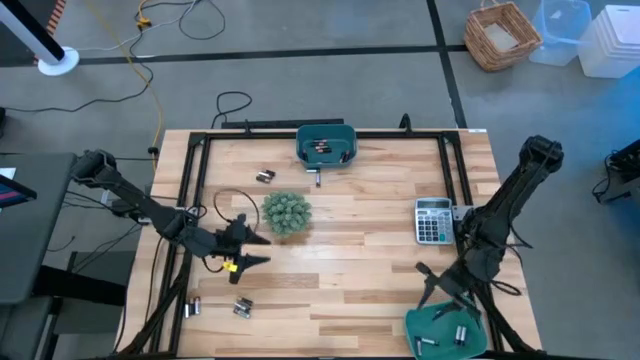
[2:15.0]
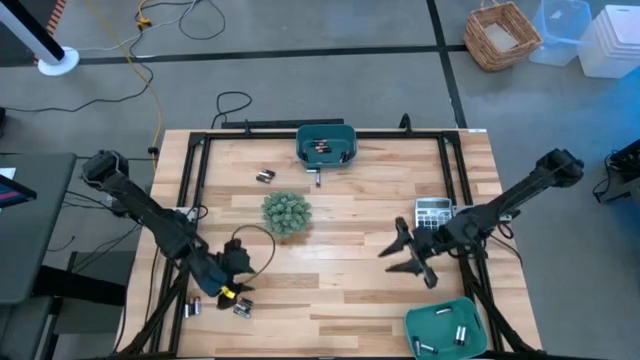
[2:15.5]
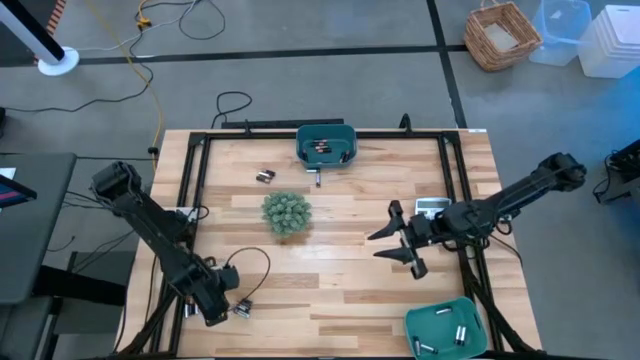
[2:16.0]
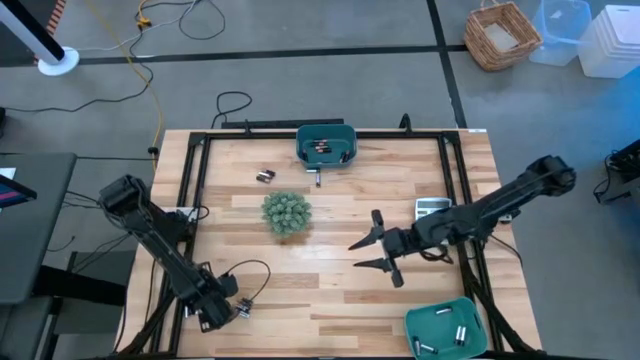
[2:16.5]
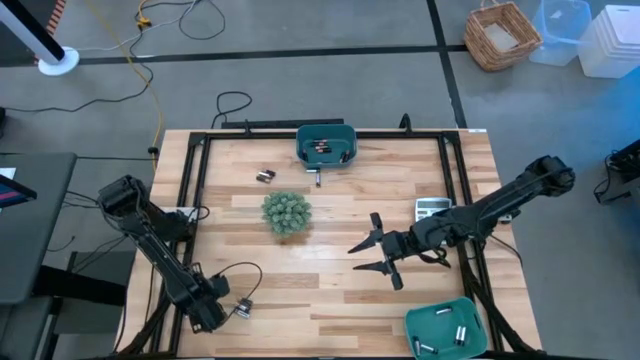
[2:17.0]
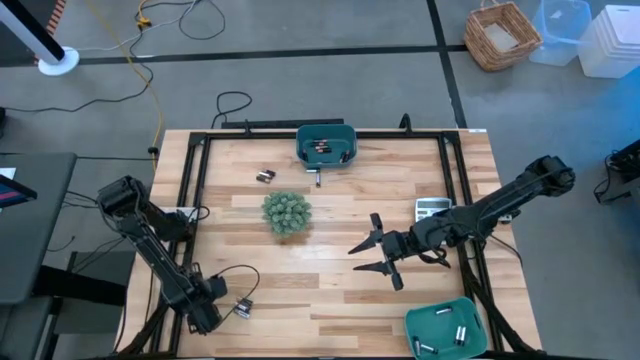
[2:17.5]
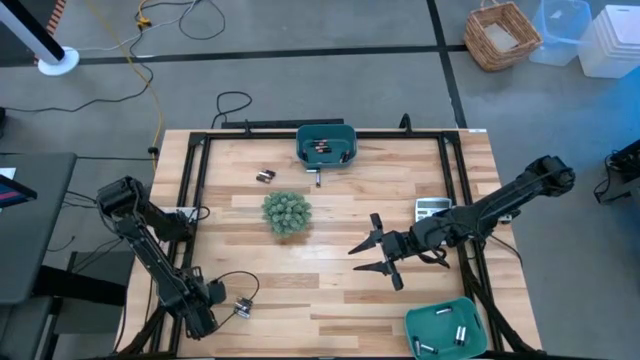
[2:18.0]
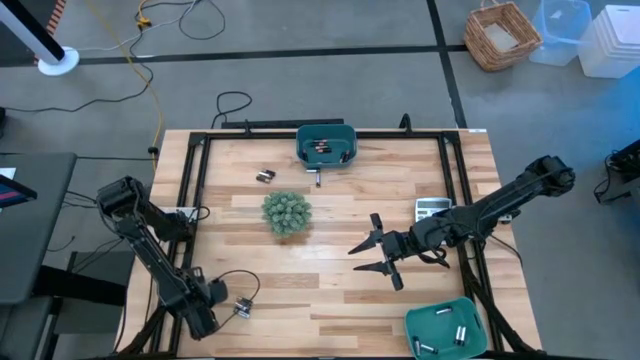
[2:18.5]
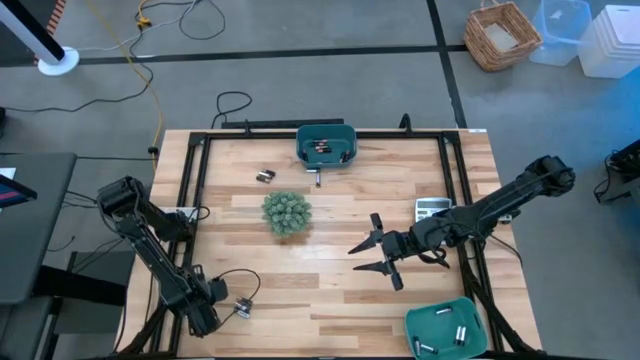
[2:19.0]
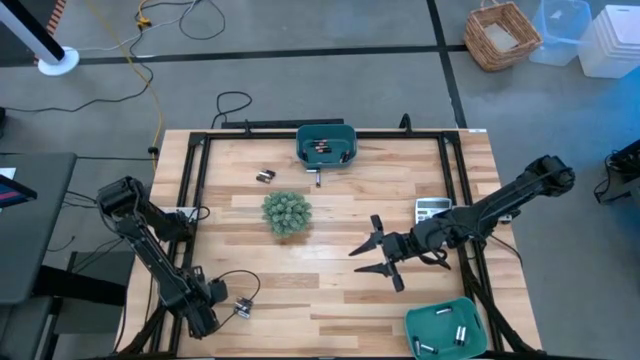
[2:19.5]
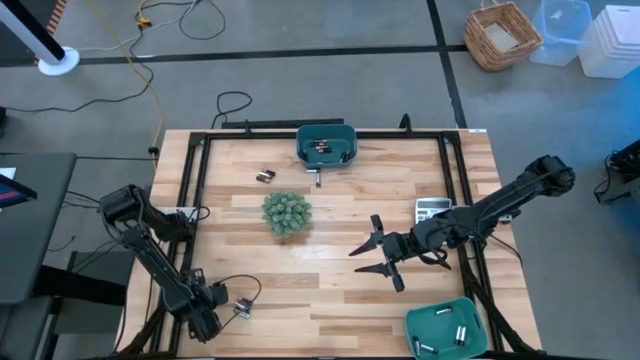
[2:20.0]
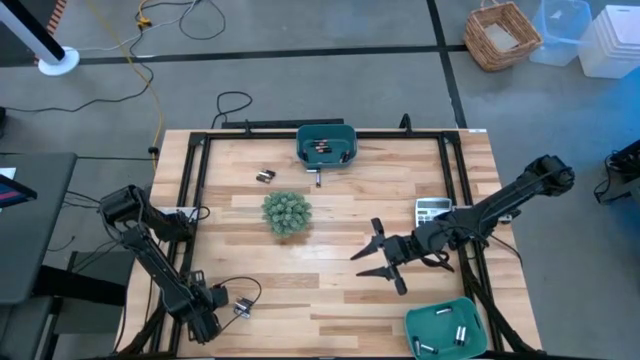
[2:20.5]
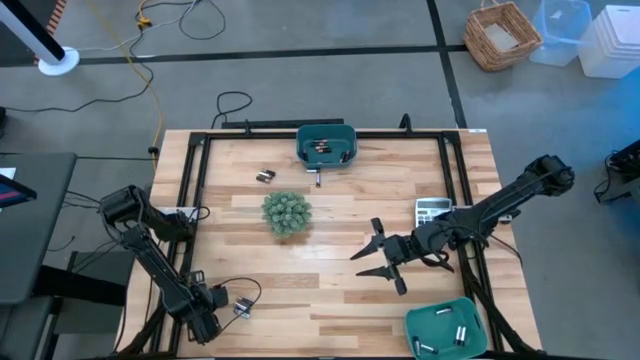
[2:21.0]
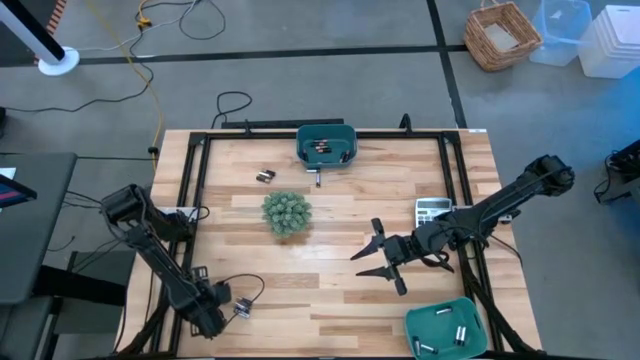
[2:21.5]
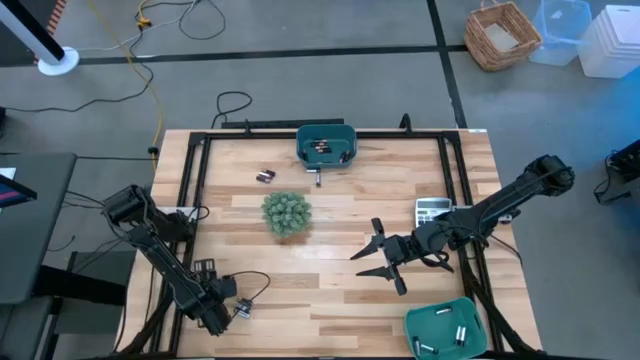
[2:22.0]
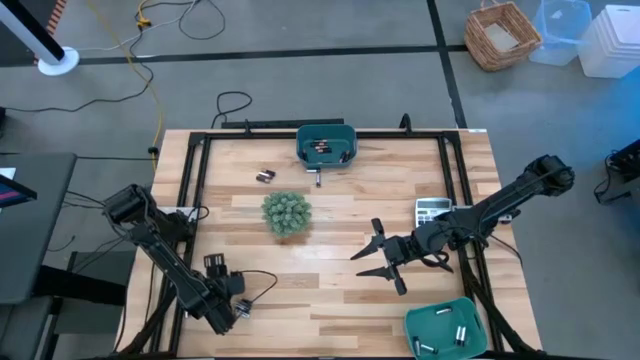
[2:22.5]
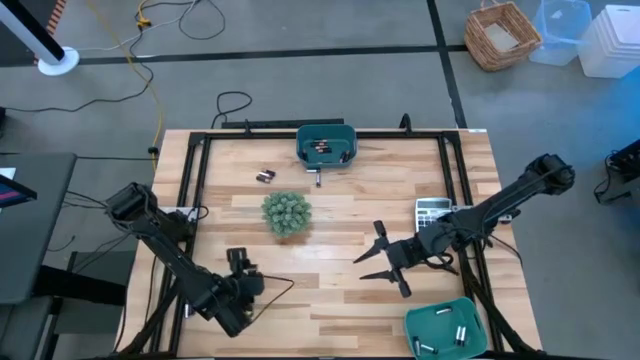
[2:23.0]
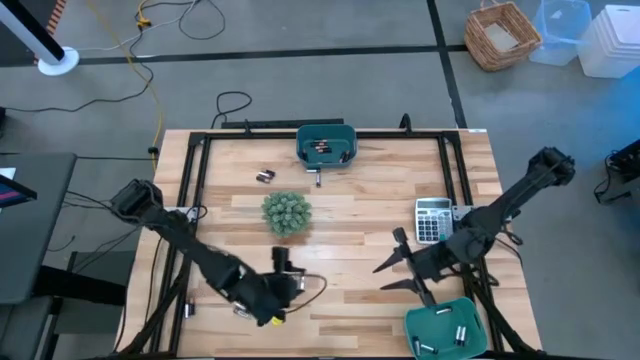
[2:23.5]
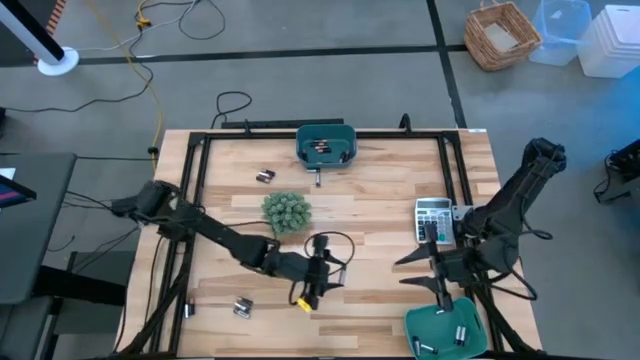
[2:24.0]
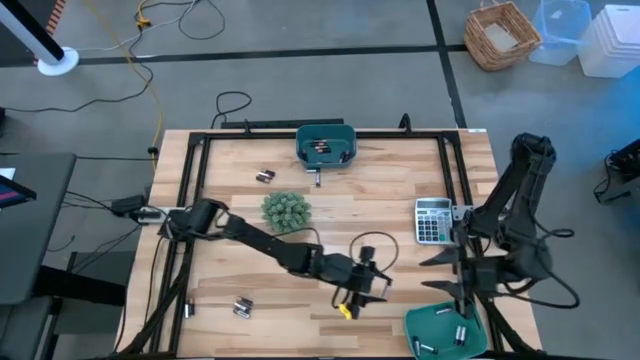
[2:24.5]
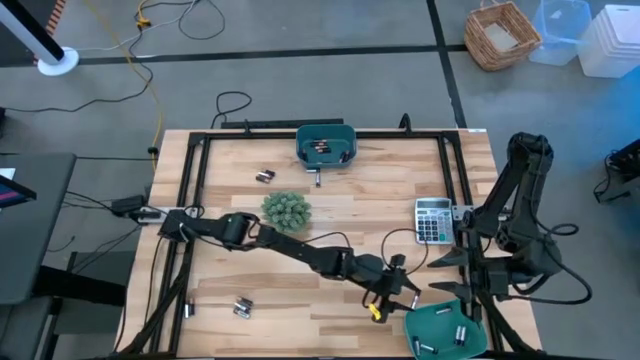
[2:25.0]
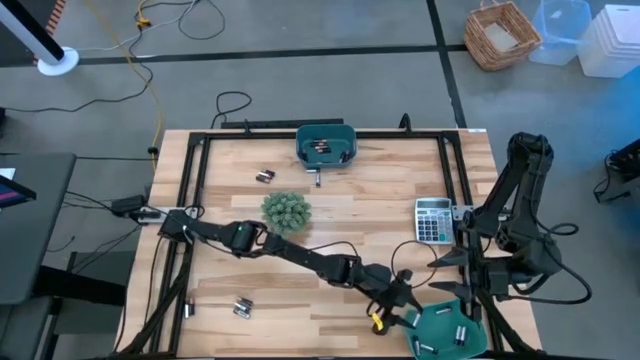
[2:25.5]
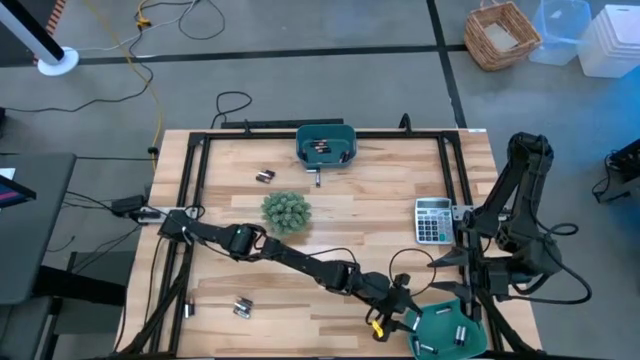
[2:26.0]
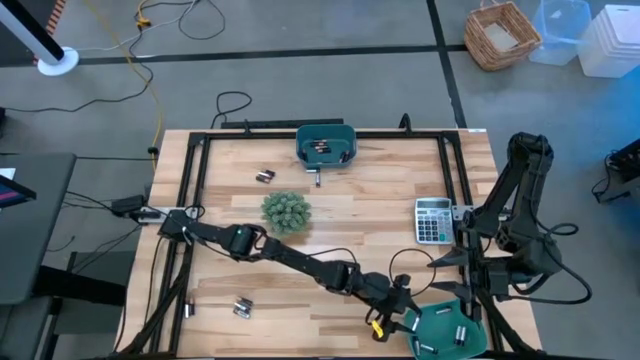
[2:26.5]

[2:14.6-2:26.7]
Task: Sort batteries
Put the silver battery into the green bin

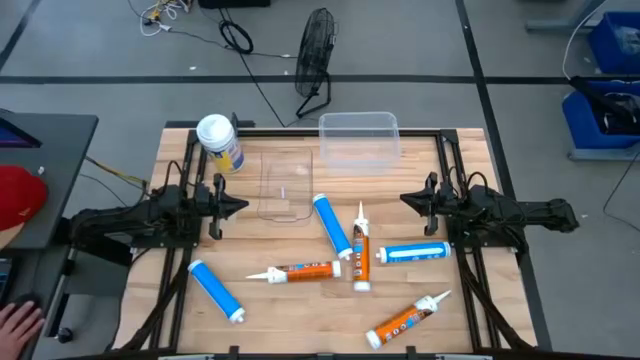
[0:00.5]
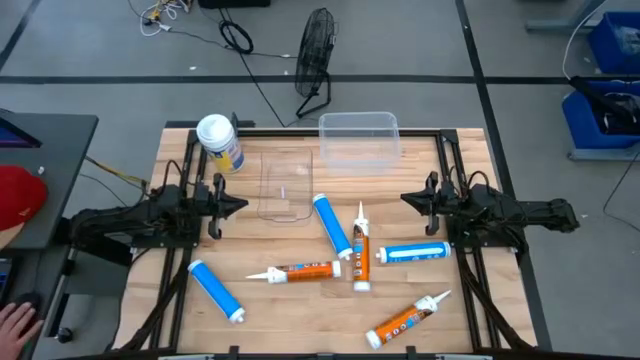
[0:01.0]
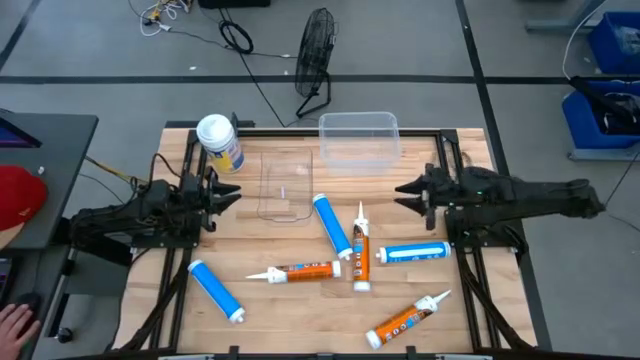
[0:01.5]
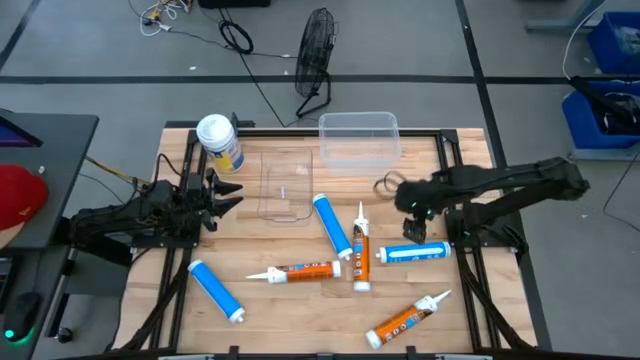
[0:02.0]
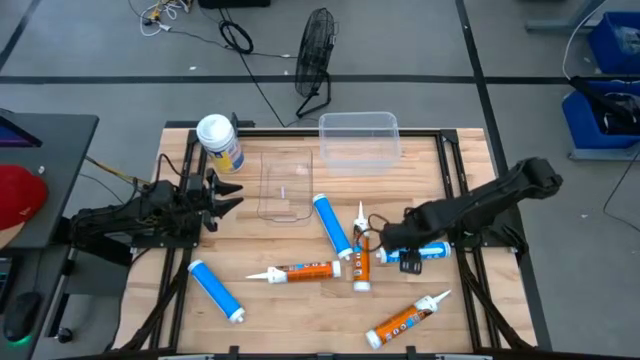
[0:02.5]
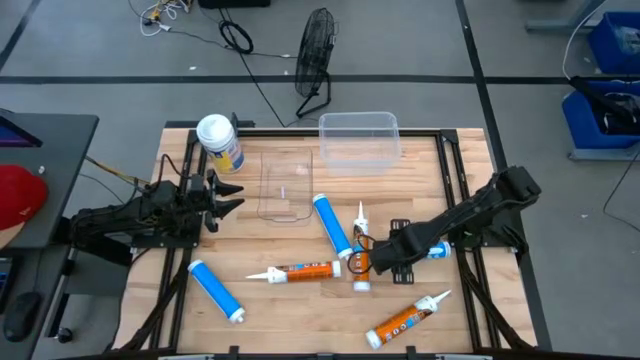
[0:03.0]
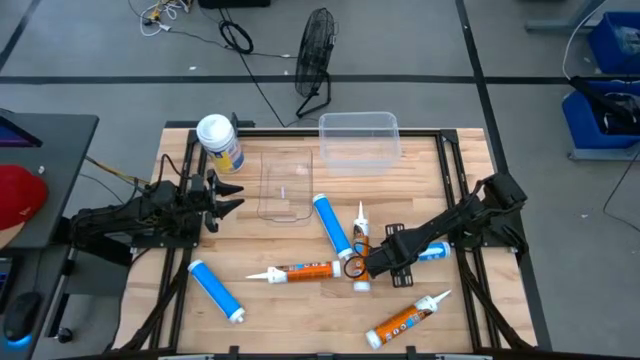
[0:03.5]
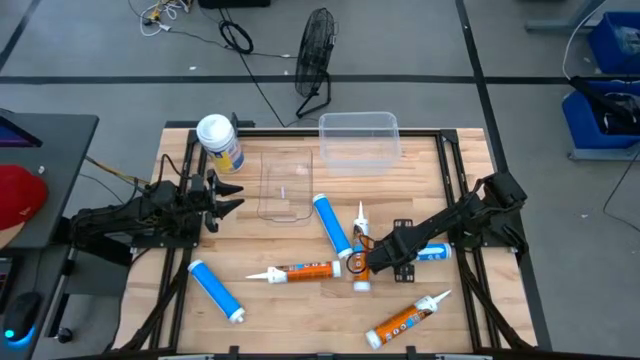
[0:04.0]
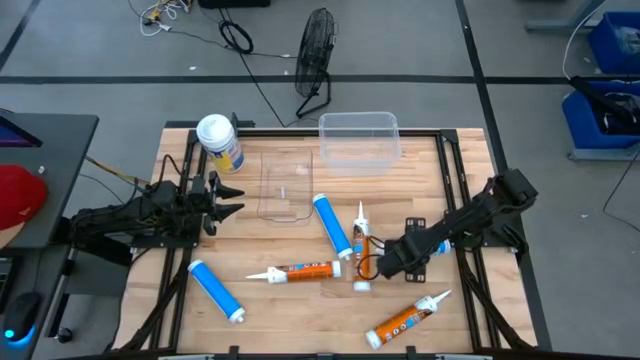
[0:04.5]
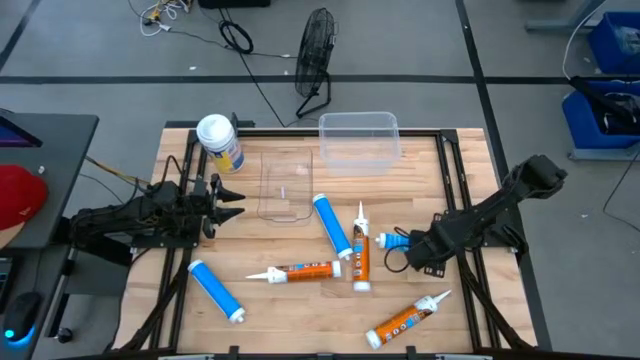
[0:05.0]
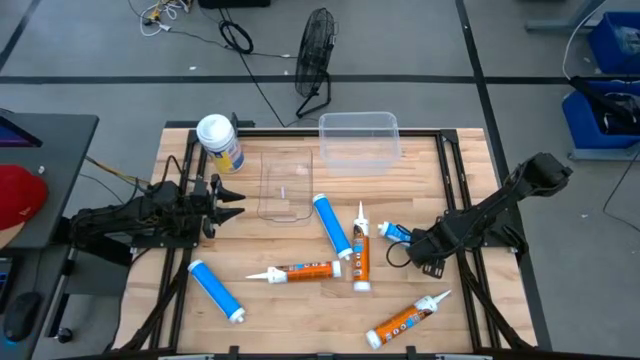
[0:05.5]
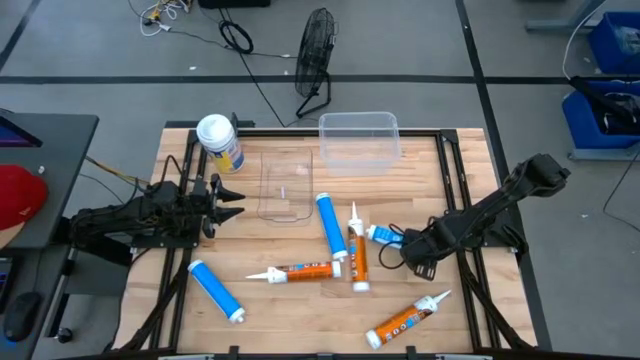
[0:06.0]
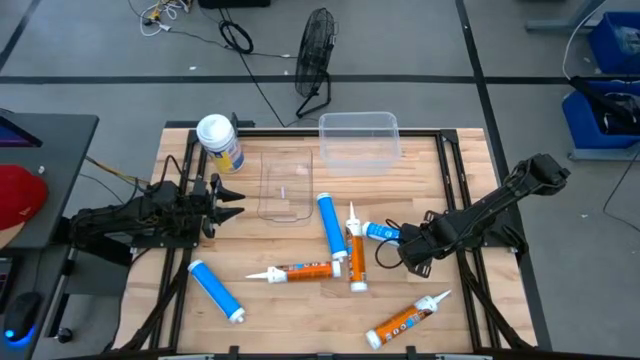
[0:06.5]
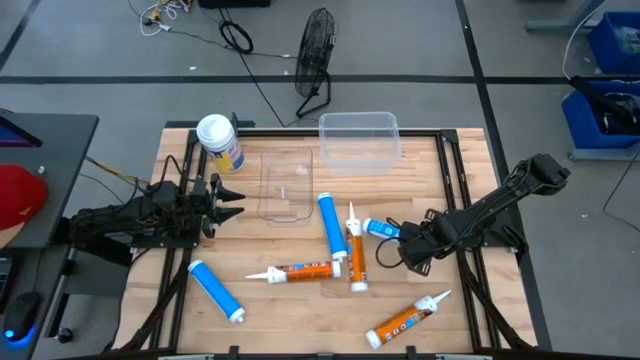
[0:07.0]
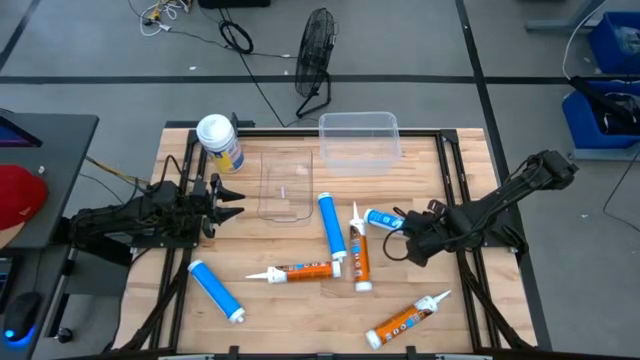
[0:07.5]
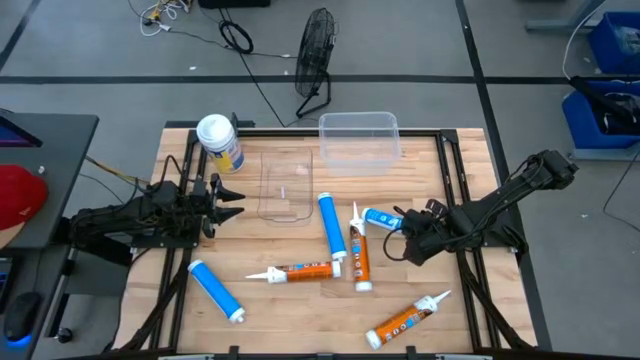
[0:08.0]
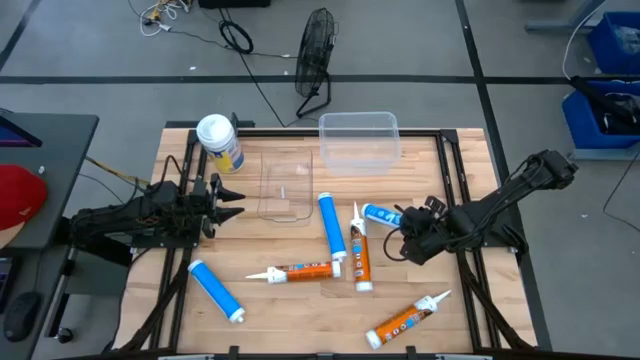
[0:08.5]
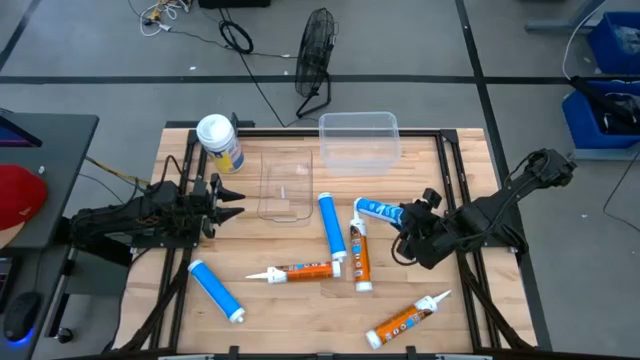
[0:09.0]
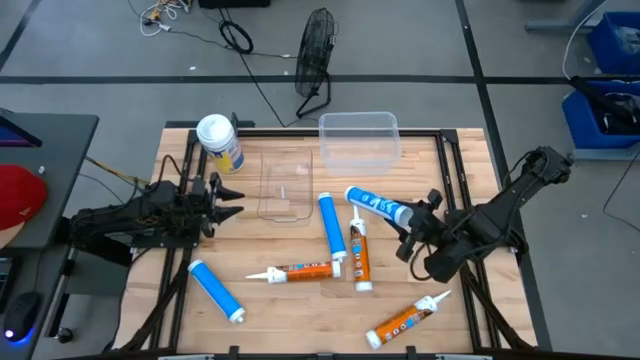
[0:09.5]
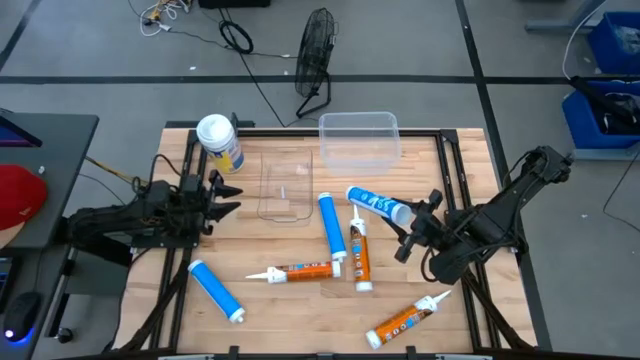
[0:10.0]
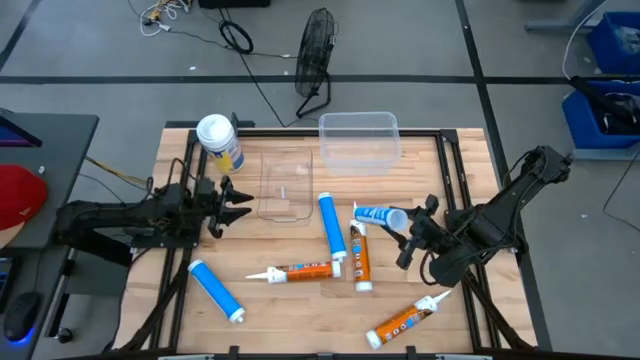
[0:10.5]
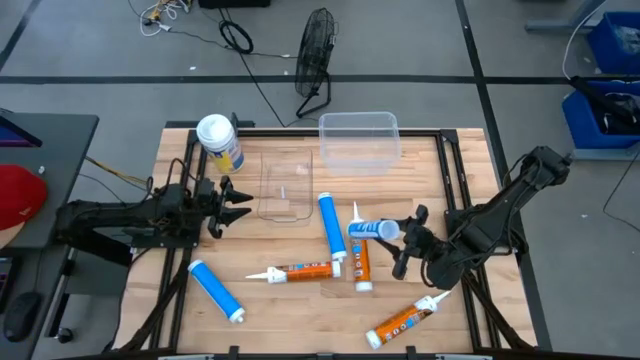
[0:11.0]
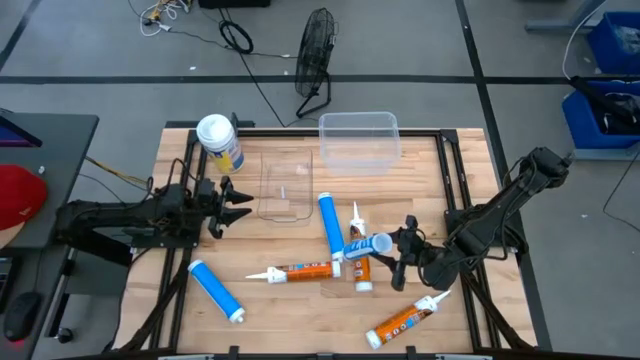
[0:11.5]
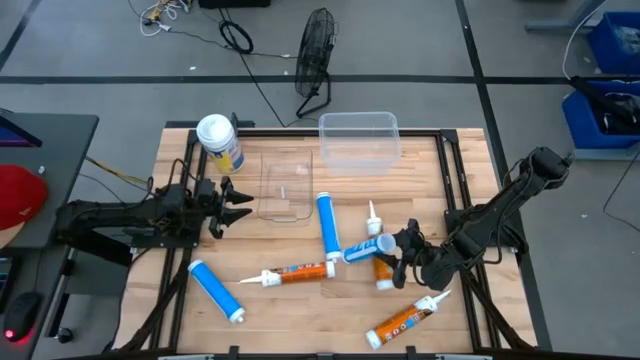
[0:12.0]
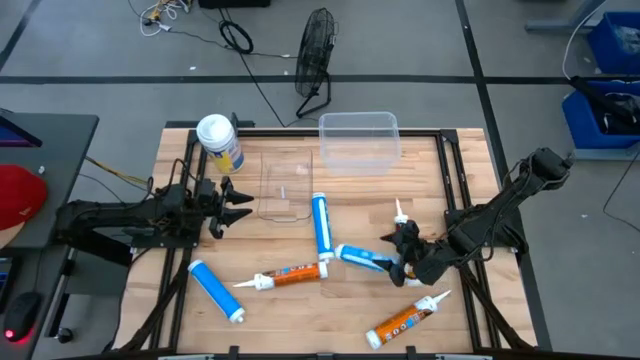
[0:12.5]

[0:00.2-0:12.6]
Task: Pick & place silicon tubes, Sealant and Lysol wipes
Put the middle right blue sealant into the left transparent bin
